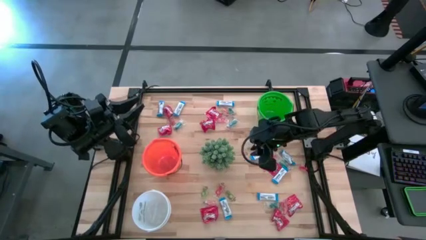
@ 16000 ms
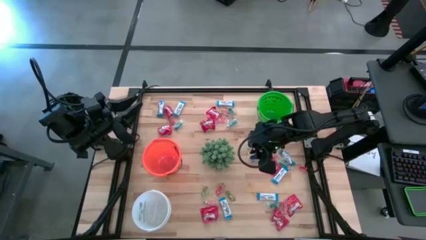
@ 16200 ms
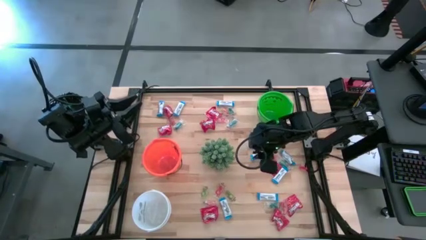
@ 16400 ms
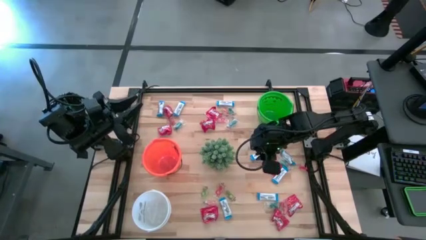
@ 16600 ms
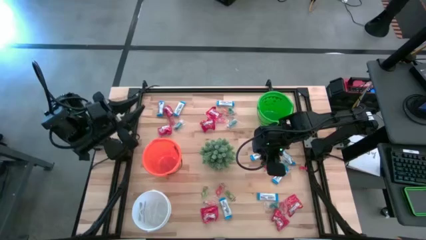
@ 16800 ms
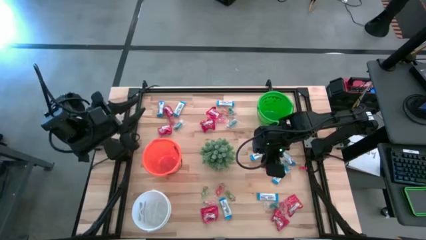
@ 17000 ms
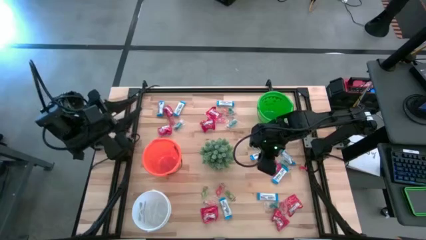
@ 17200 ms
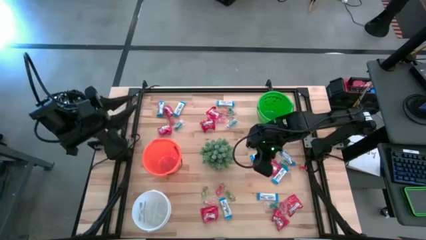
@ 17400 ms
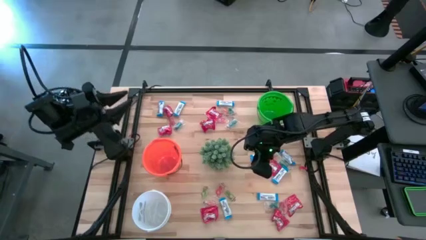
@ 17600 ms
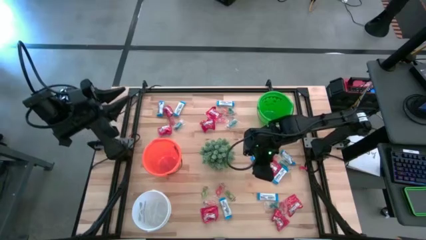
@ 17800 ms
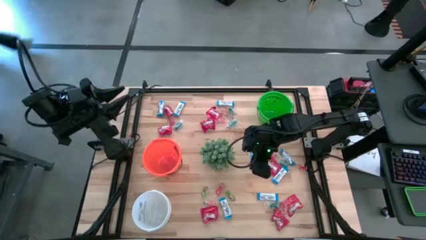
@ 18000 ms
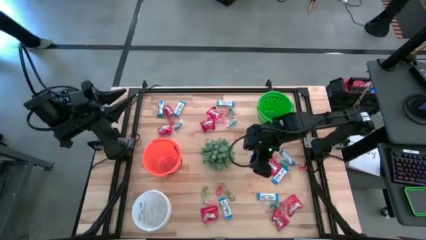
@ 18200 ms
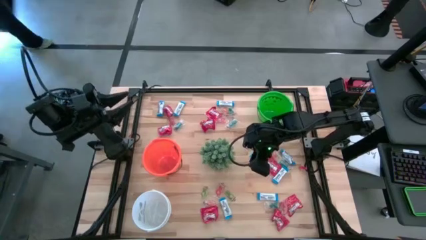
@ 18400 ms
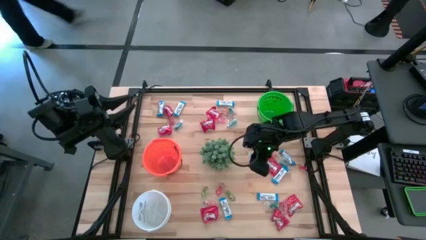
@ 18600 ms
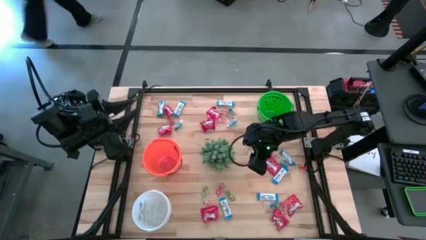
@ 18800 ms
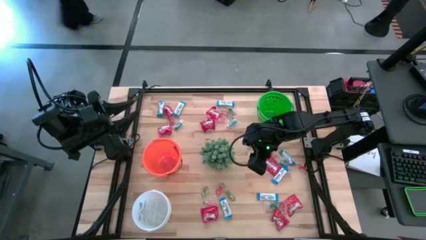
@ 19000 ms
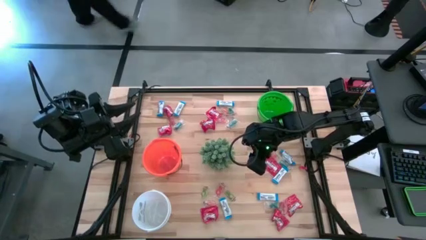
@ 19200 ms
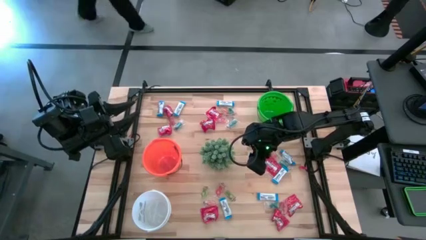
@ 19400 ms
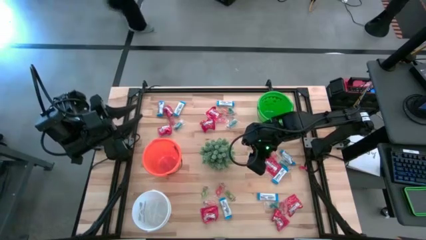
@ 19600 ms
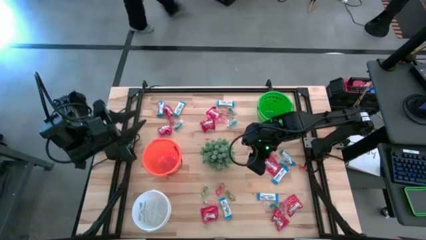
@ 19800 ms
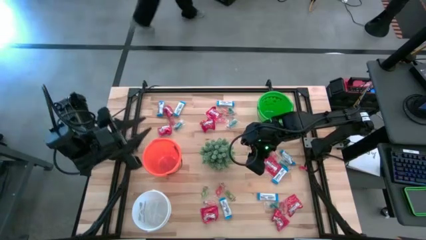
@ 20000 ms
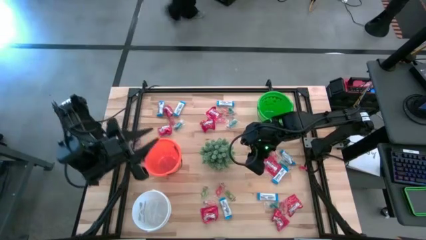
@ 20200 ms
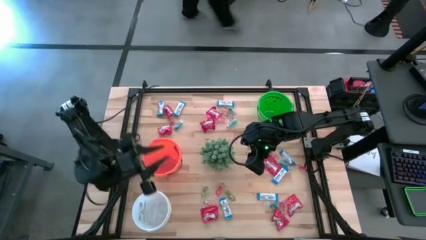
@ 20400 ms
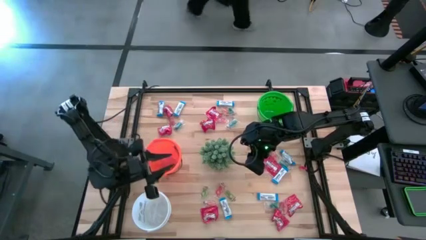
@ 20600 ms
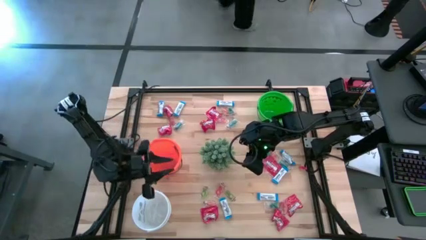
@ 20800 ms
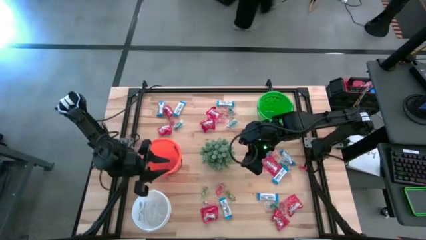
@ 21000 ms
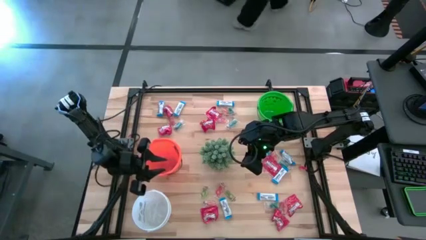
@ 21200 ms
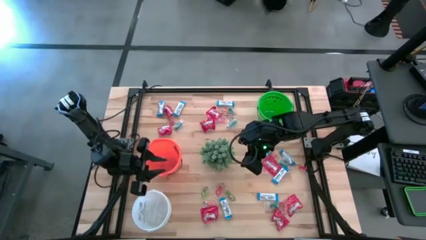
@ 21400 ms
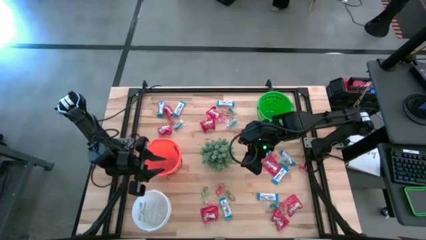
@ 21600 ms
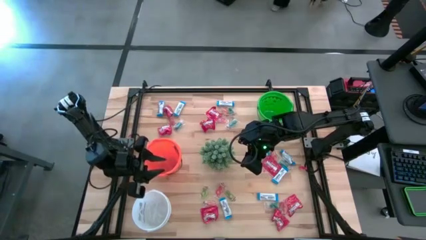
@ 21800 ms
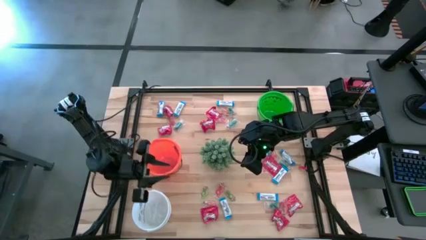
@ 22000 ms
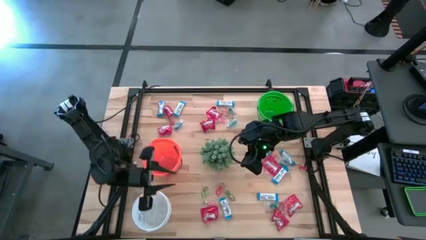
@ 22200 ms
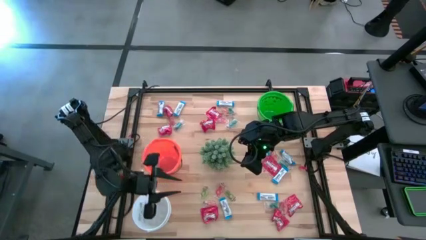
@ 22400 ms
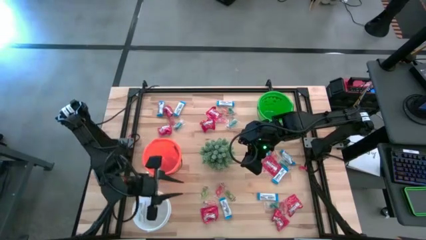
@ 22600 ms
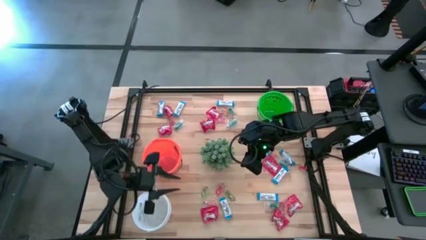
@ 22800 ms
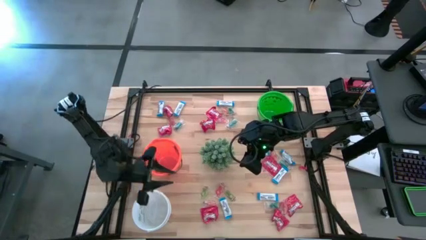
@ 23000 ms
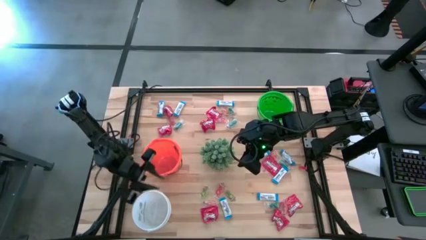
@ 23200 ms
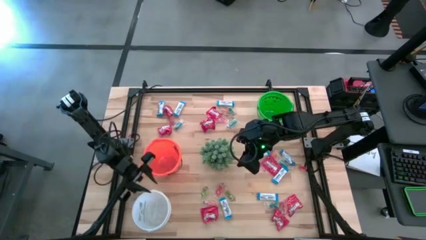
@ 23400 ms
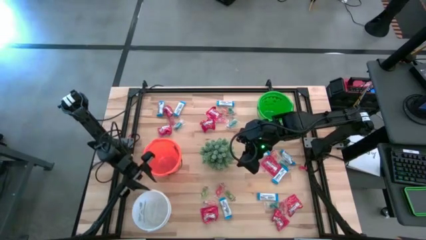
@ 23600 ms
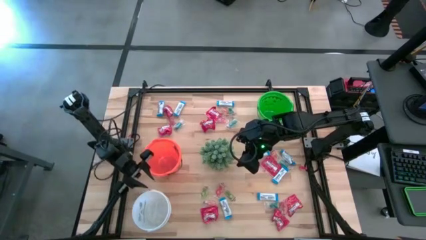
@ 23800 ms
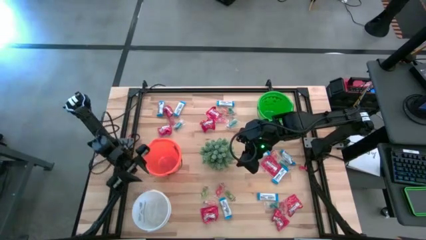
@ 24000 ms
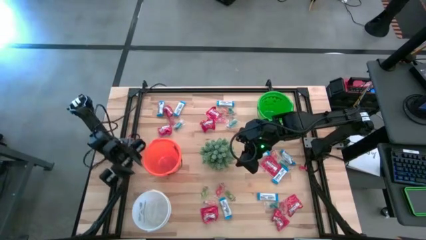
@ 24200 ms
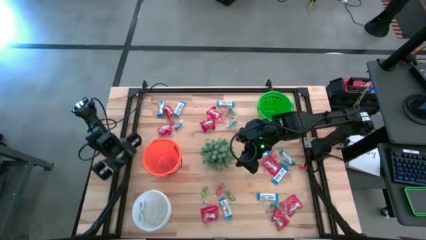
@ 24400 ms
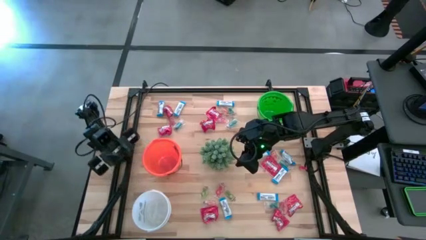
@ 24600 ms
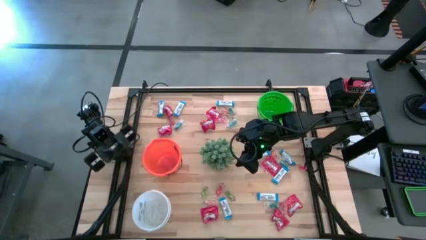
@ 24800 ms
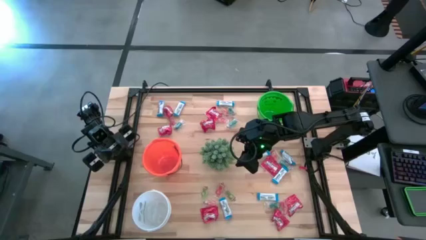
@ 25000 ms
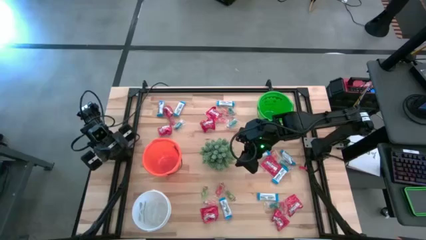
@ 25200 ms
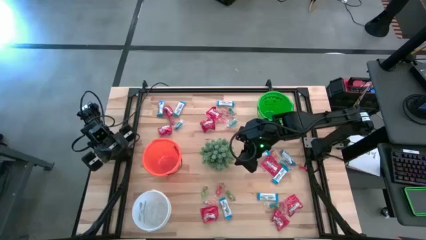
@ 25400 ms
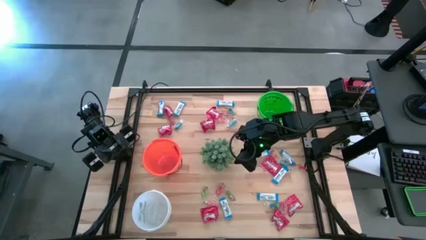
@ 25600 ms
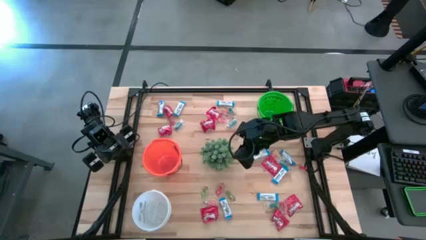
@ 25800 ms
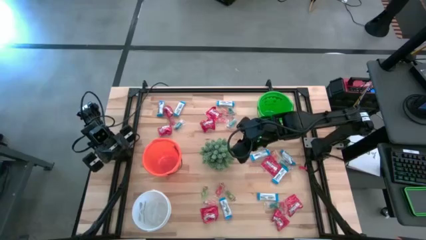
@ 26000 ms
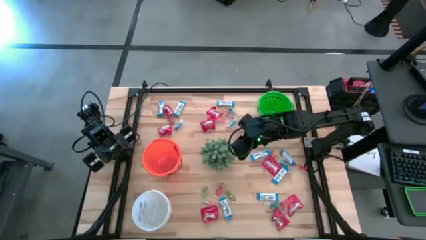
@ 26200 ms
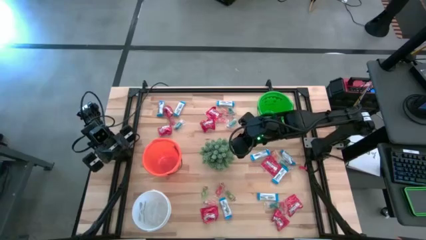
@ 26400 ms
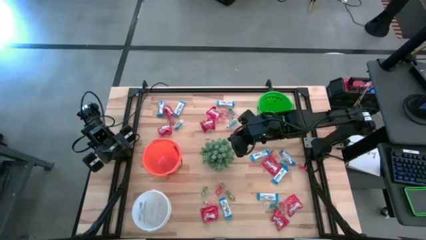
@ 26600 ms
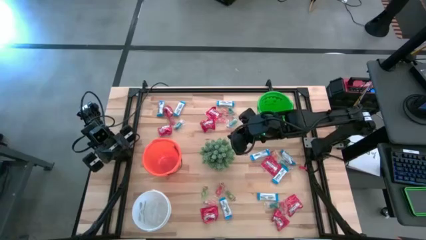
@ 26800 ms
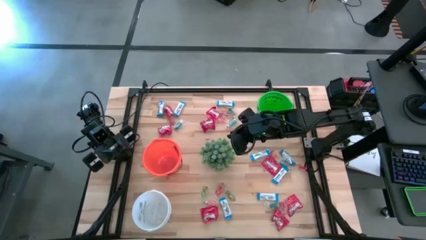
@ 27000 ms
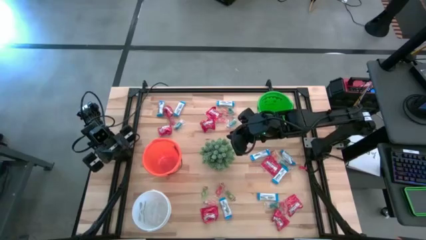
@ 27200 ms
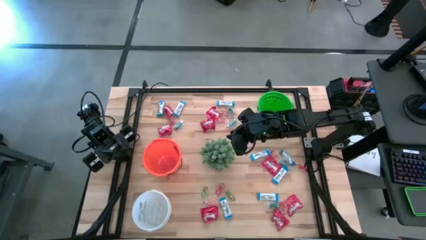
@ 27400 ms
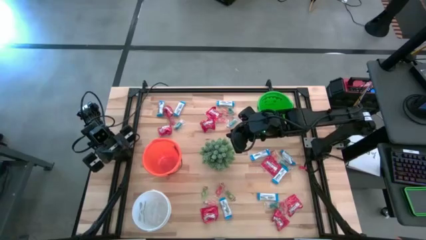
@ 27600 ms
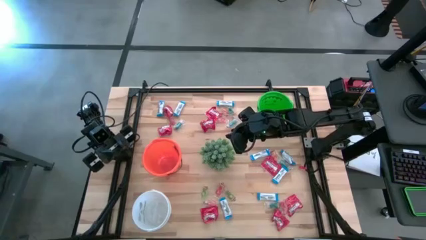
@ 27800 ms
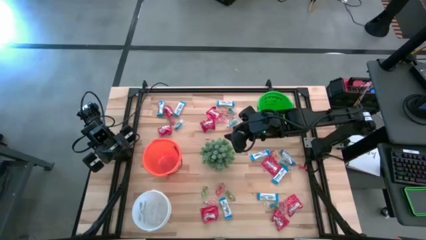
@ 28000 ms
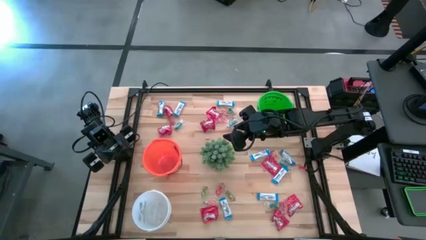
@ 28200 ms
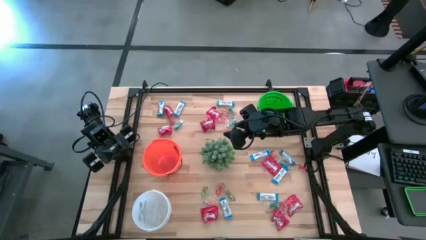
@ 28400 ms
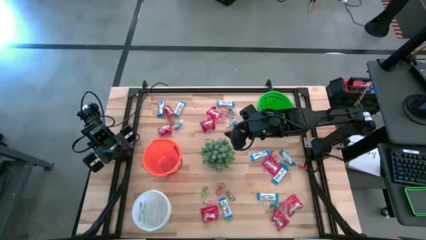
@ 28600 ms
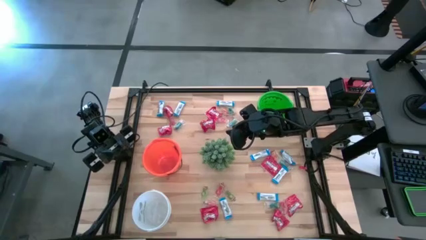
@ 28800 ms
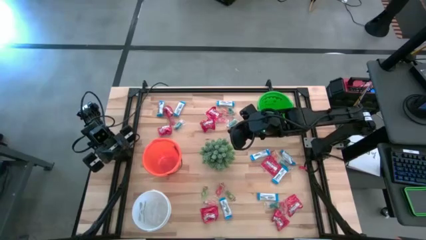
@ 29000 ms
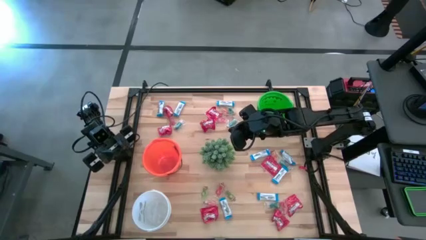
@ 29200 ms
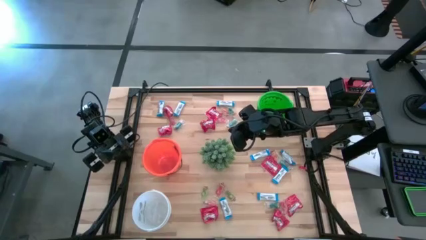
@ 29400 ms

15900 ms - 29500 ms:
Task: Sort candy
Put the red candy into the green bucket
